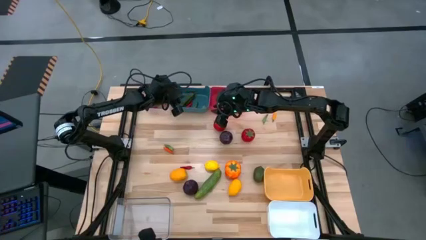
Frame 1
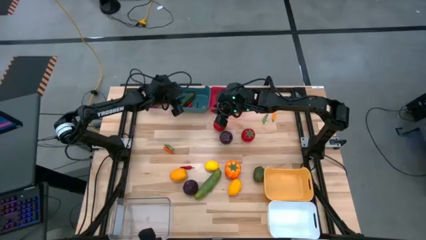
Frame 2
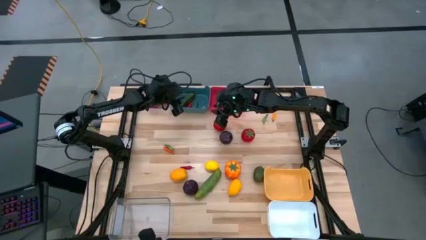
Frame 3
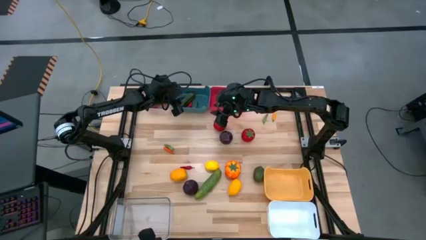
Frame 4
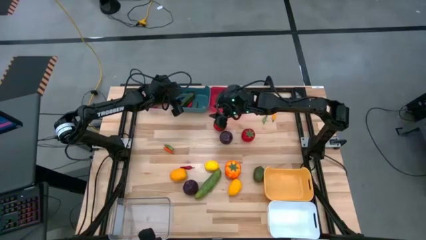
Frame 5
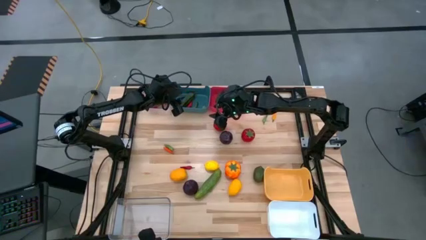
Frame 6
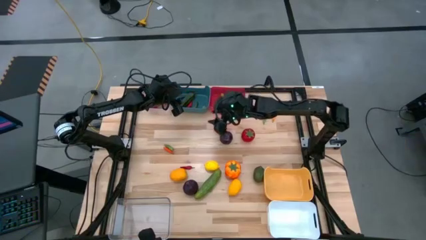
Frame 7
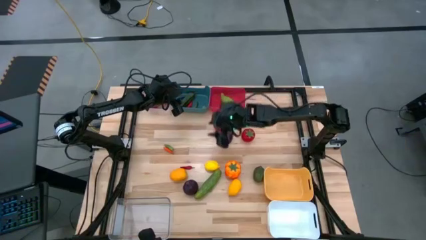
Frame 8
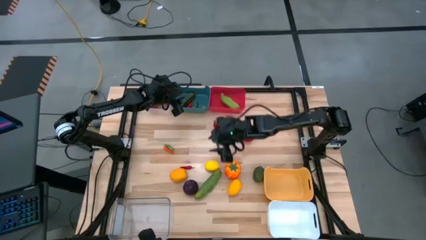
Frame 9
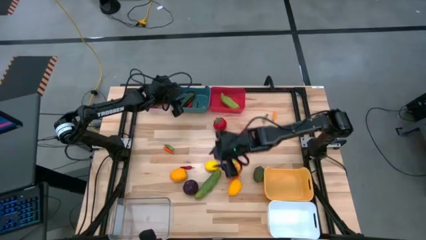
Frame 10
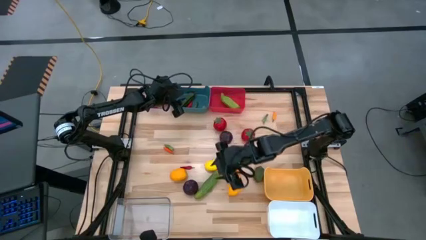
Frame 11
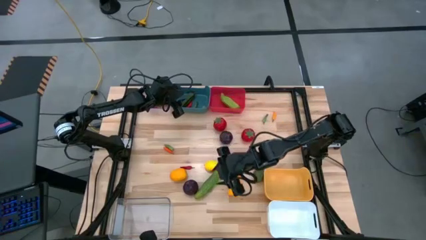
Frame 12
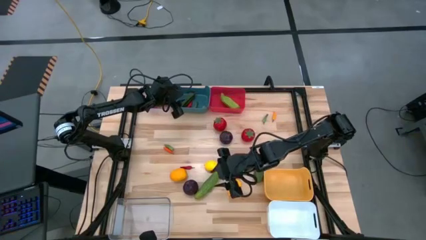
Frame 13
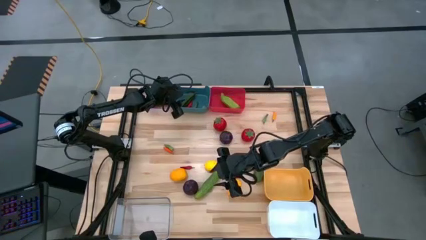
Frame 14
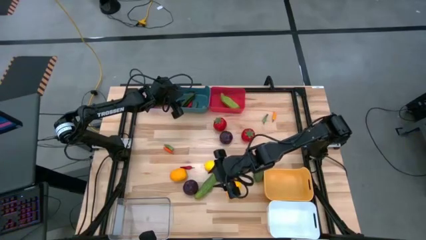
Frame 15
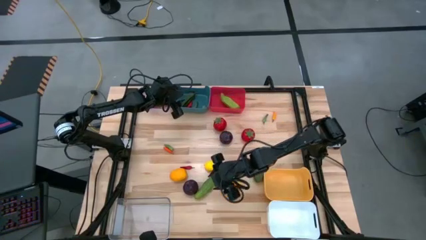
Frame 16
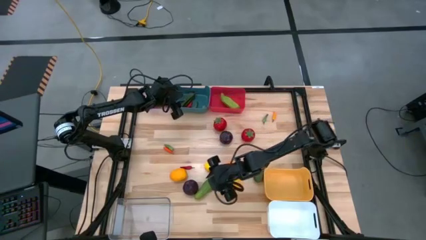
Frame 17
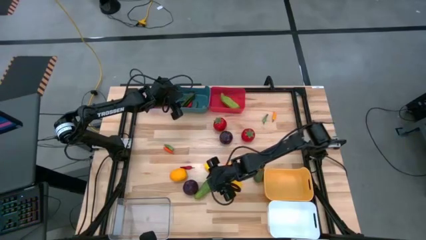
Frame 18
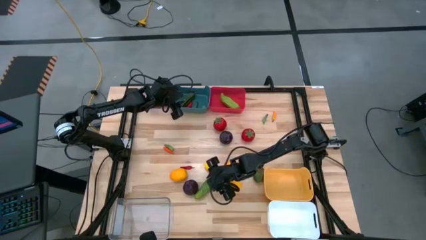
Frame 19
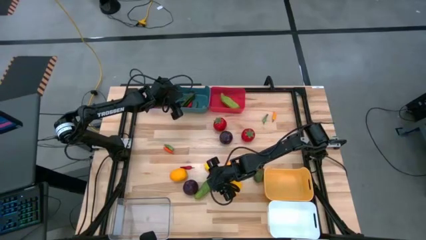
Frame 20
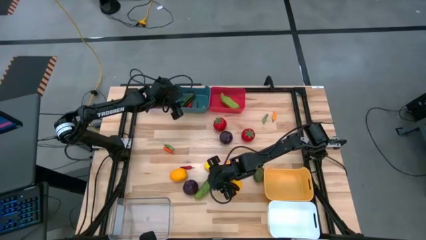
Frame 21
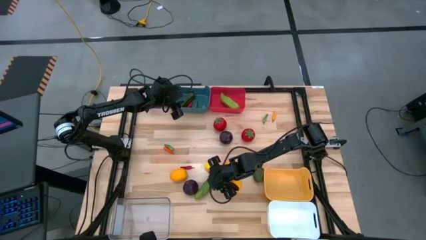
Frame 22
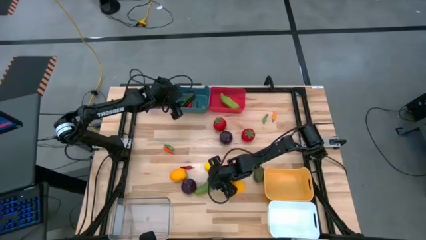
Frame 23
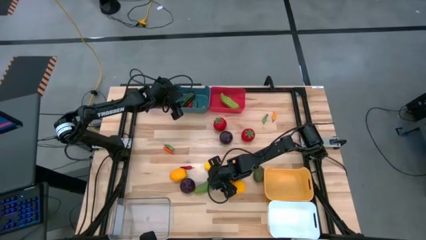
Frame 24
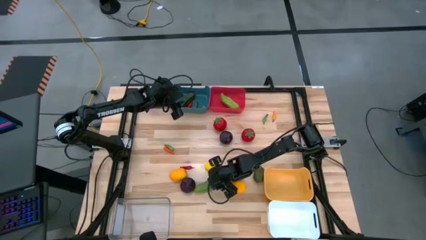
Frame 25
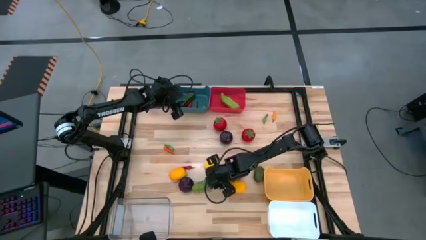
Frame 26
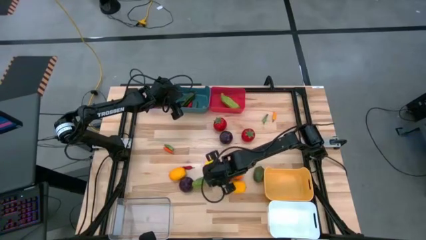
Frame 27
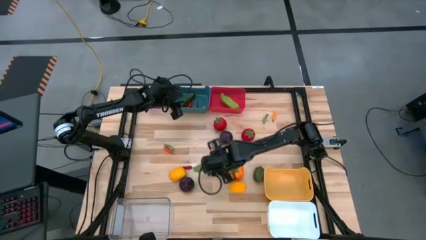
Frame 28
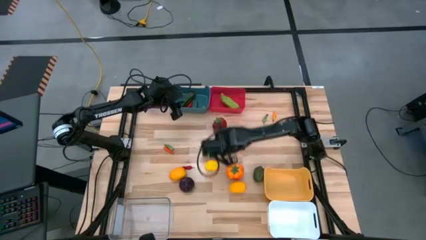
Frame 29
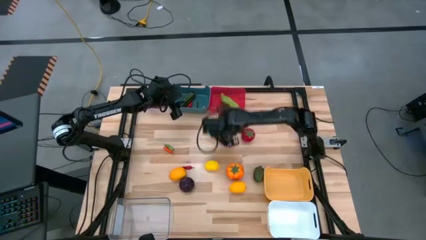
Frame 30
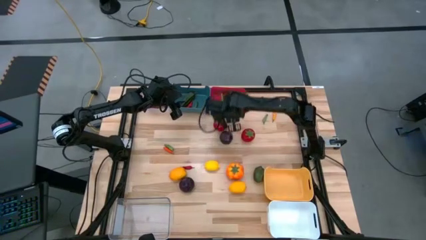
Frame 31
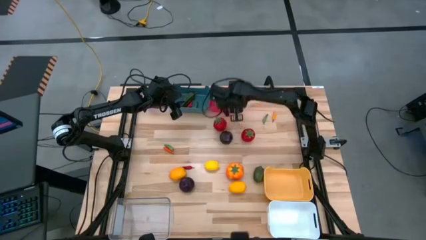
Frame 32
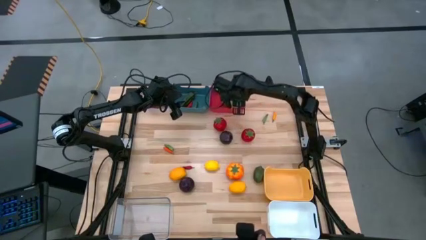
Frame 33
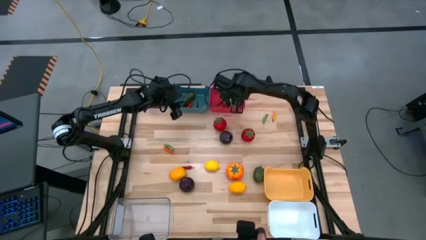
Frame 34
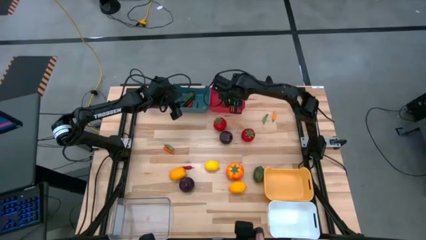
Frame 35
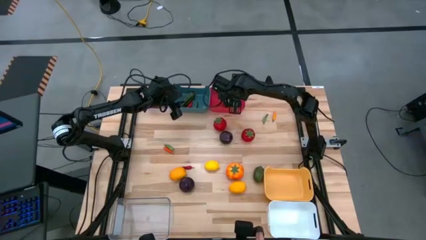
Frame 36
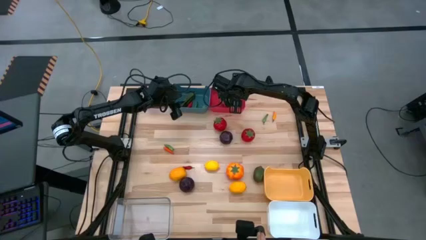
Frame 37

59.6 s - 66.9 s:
Task: Sort produce into baskets
Put the cucumber into the red bin

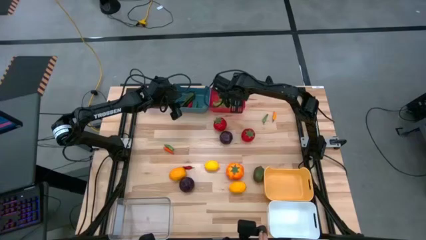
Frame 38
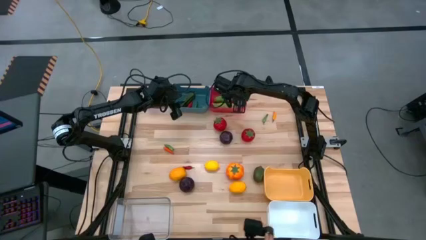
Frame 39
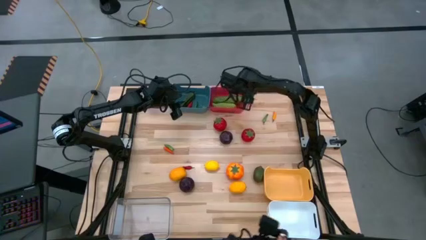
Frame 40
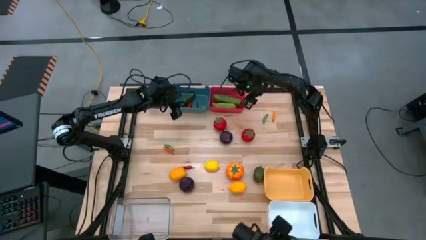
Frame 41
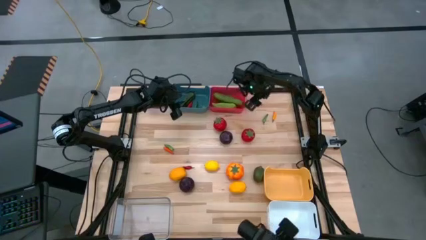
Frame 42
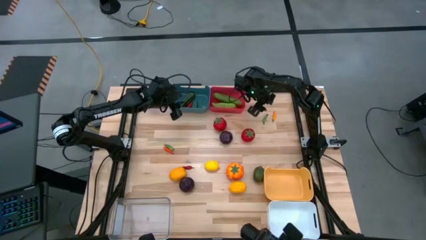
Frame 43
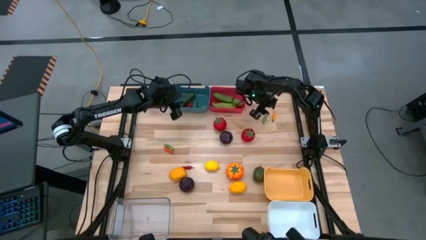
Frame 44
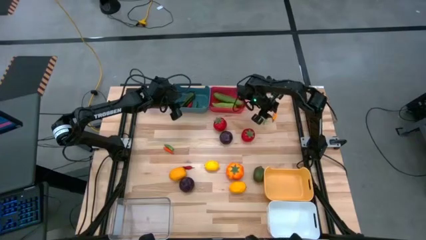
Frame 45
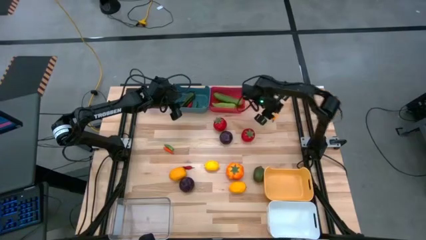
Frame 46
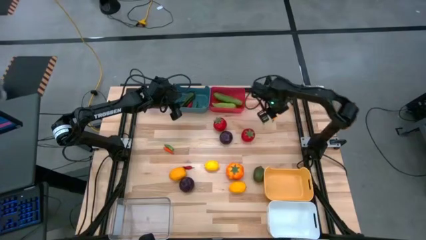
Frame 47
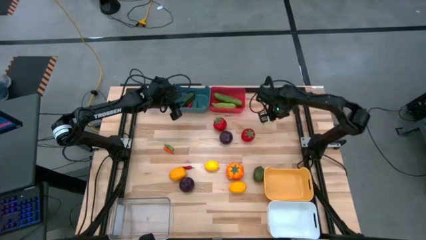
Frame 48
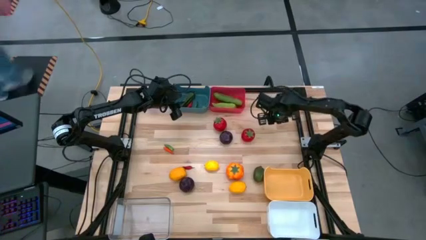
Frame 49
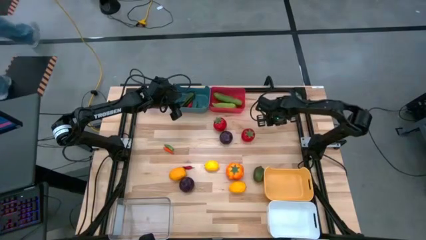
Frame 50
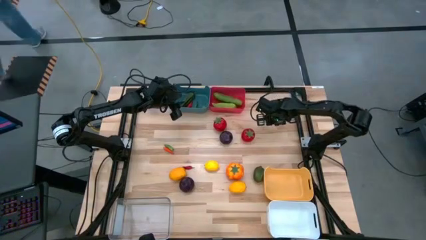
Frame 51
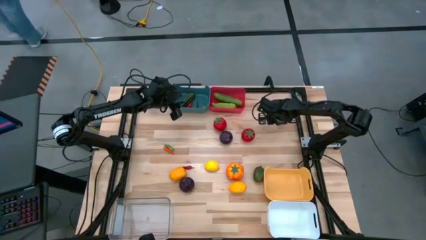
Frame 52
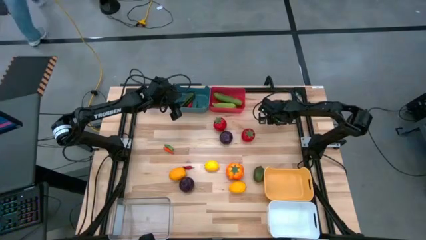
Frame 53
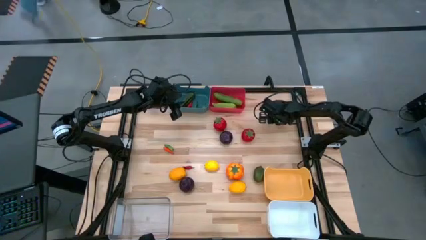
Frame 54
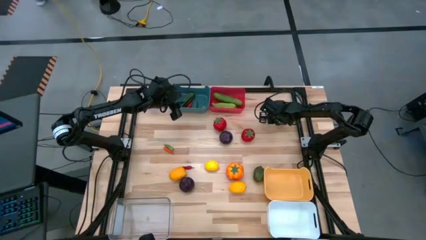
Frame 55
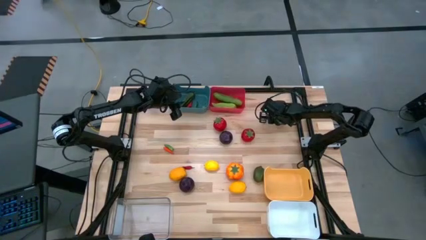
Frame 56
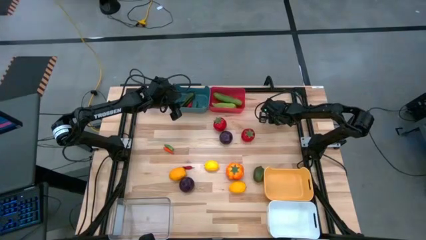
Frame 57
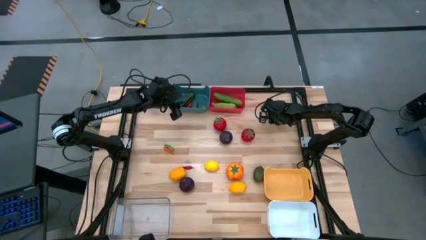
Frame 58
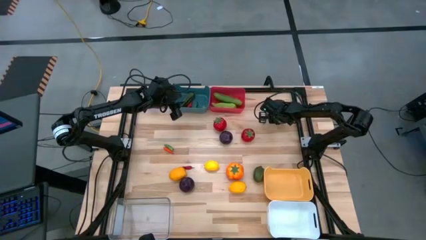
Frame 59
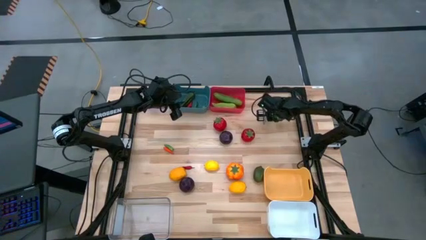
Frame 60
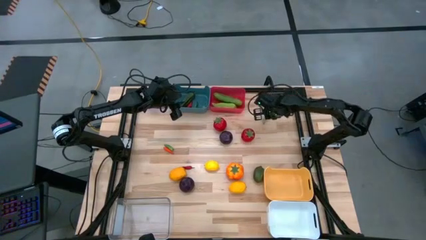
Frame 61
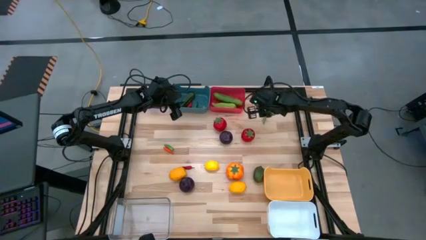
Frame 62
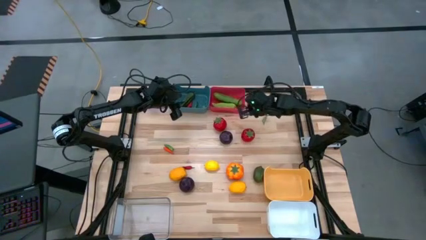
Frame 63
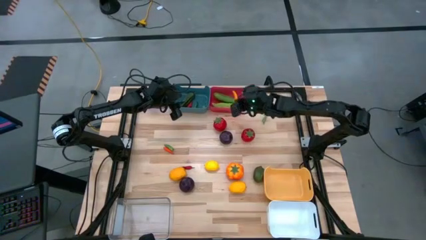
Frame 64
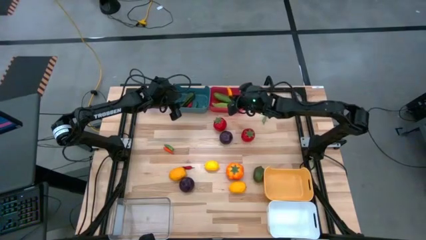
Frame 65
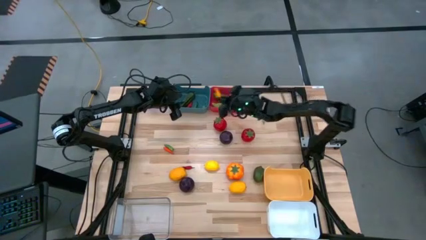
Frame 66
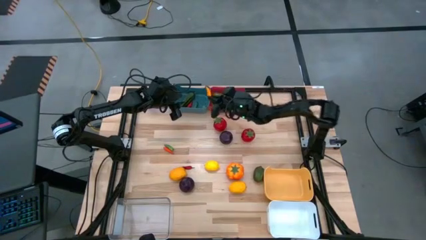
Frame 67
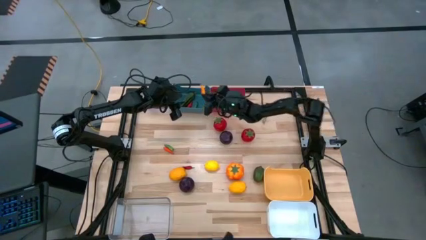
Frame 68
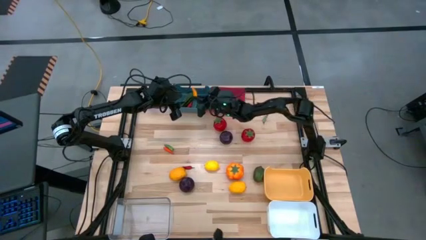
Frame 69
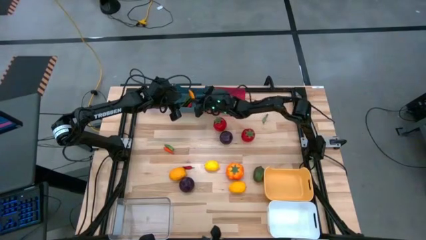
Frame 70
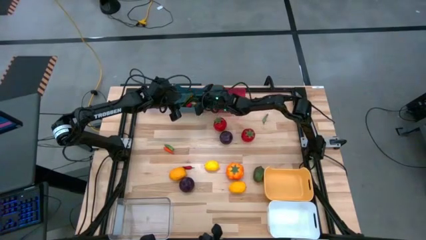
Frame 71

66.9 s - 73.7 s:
Put the yellow chili pepper into the blue bin

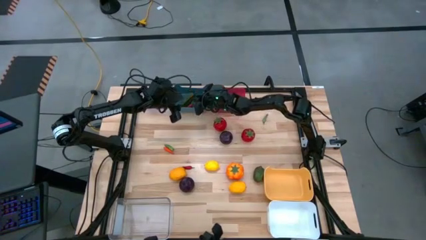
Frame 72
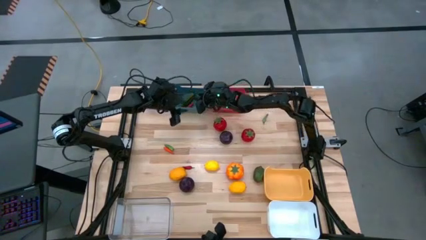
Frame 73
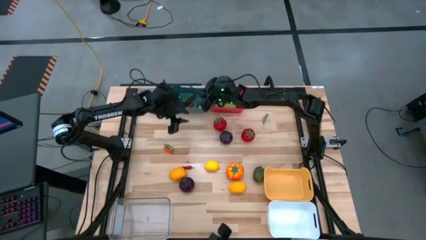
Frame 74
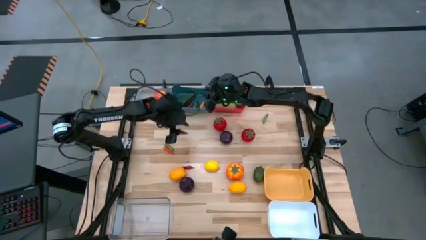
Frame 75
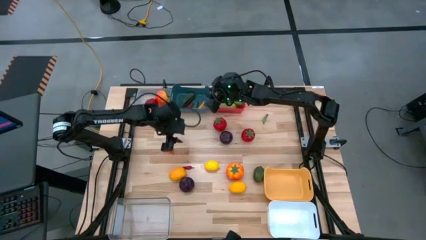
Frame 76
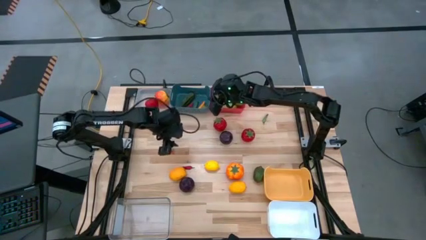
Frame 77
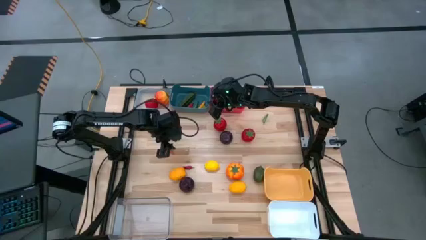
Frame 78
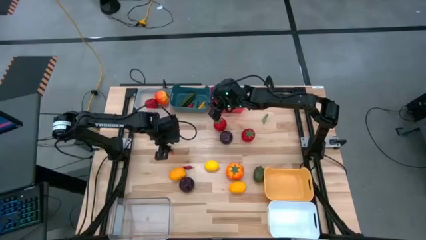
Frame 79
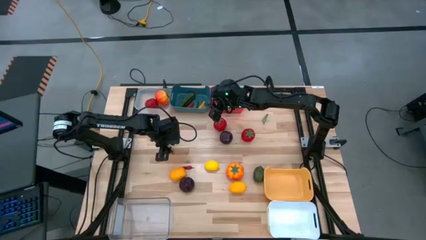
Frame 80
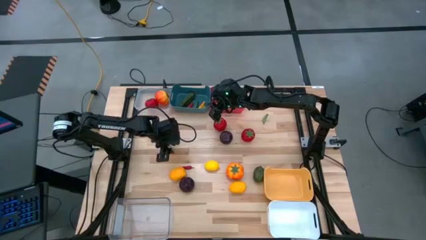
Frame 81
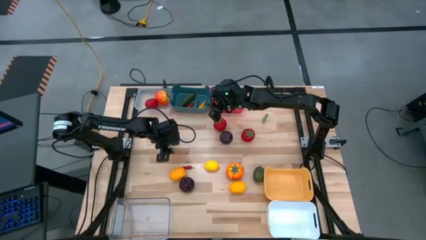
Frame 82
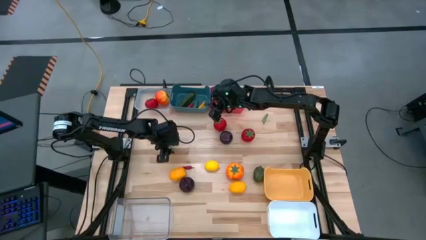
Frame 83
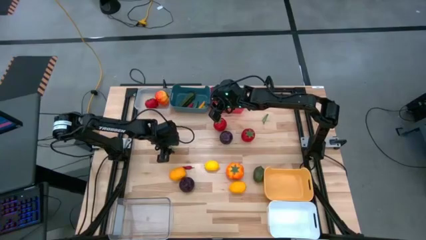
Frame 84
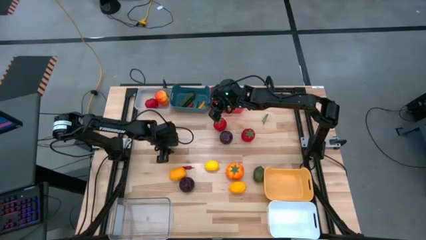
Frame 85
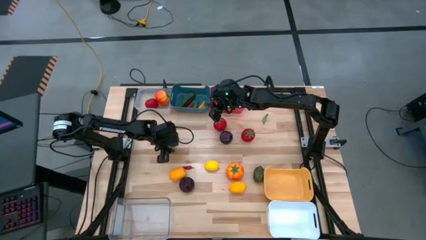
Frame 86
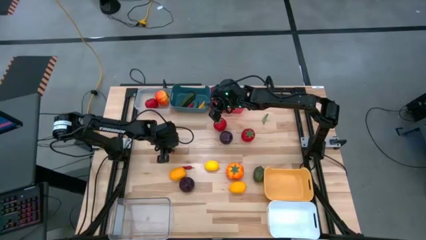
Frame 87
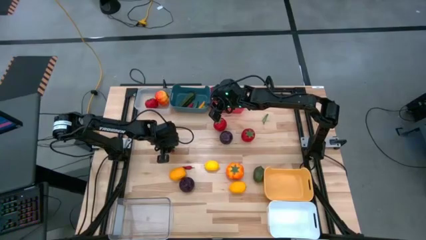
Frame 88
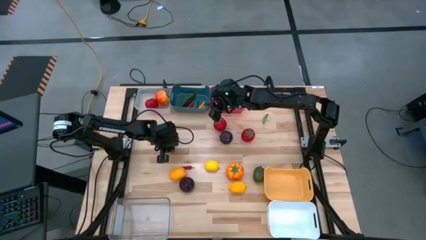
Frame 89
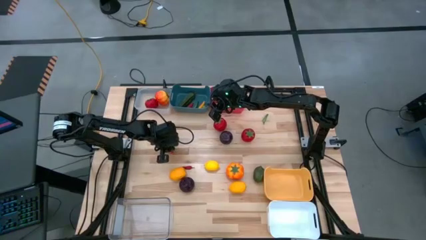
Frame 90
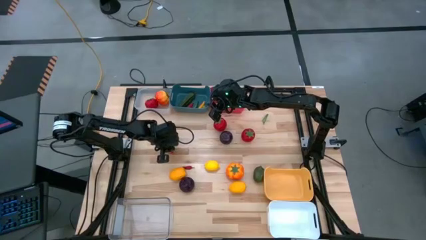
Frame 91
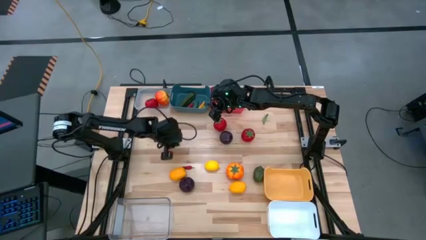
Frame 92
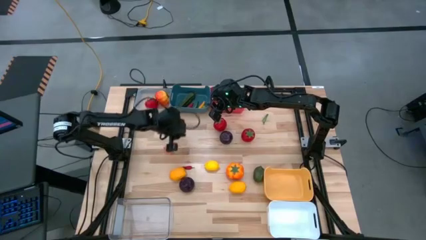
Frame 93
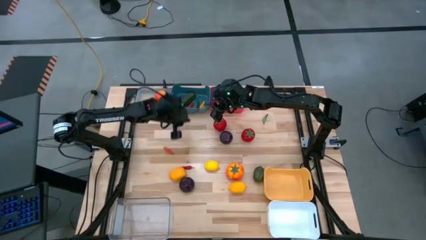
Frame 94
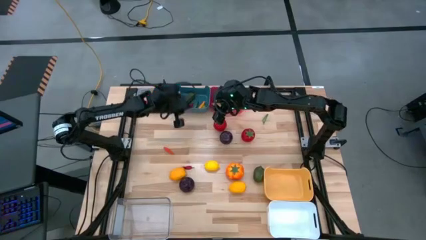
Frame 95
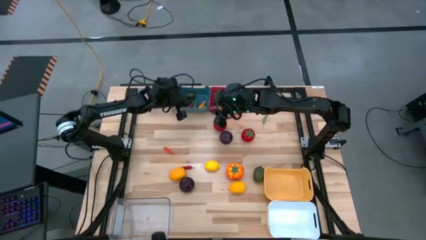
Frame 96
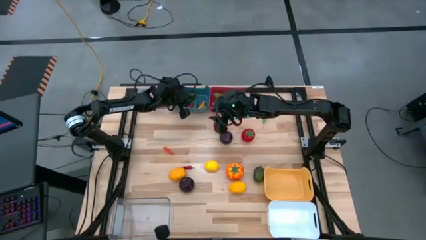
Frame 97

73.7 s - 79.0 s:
Put the green chili pepper into the blue bin
